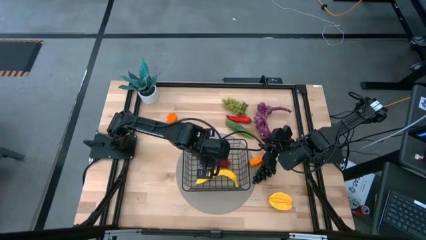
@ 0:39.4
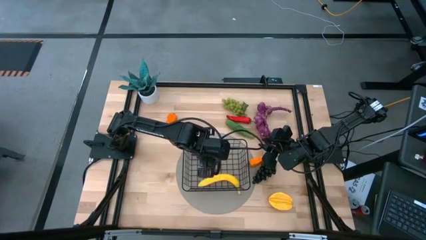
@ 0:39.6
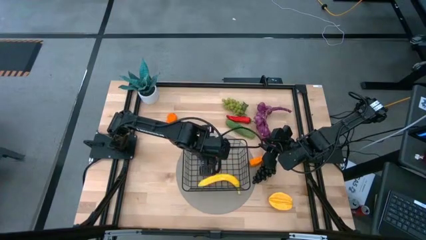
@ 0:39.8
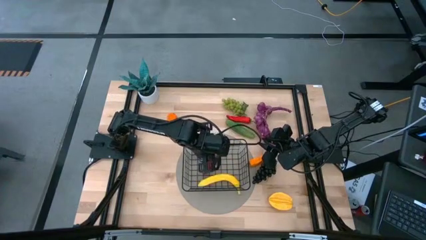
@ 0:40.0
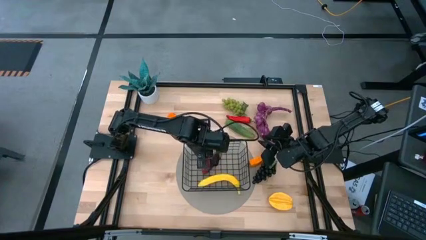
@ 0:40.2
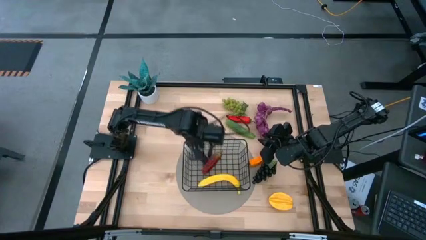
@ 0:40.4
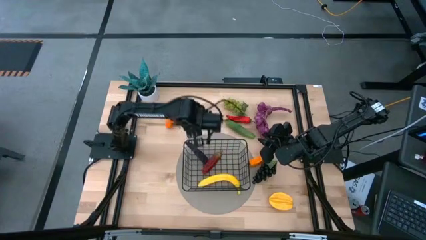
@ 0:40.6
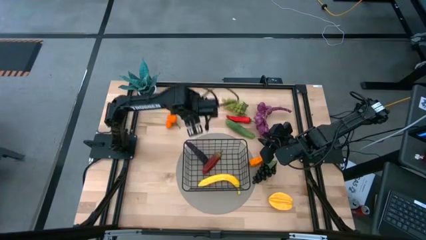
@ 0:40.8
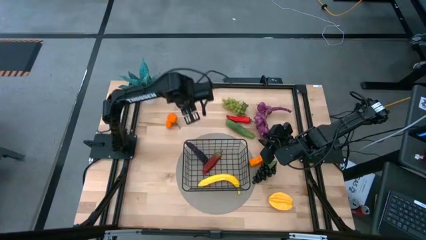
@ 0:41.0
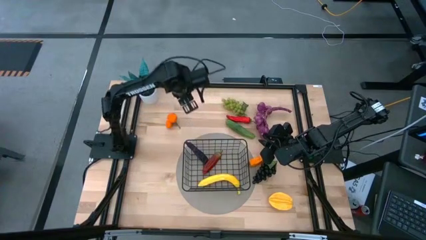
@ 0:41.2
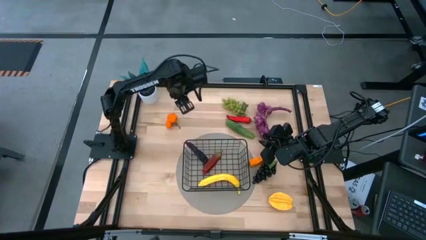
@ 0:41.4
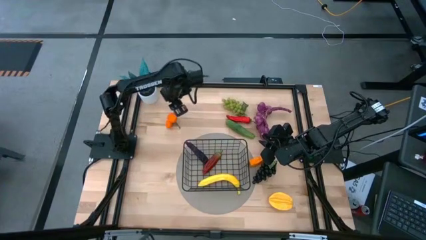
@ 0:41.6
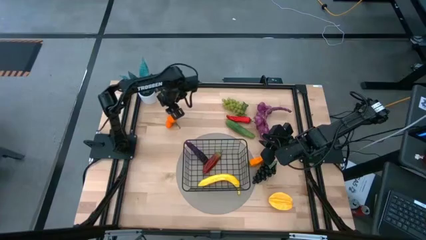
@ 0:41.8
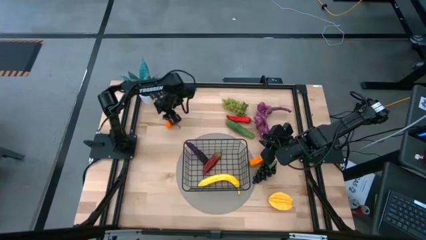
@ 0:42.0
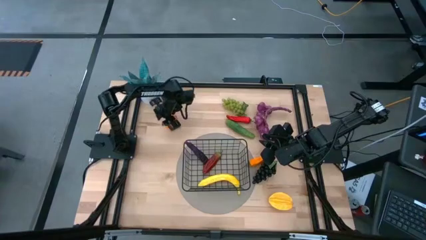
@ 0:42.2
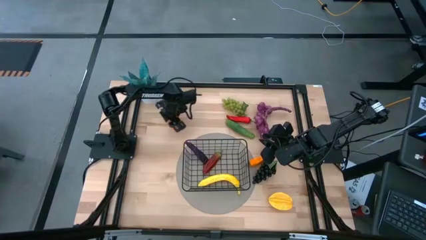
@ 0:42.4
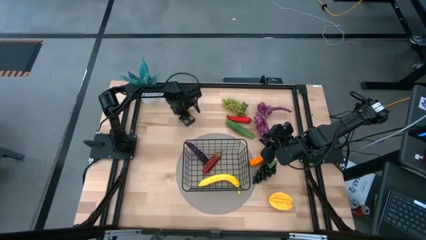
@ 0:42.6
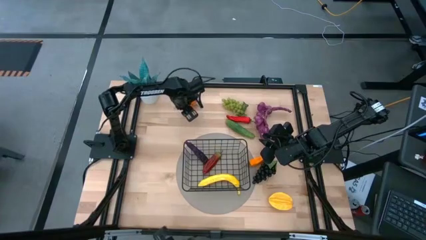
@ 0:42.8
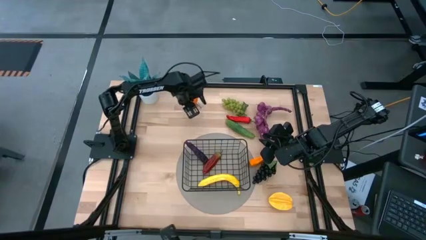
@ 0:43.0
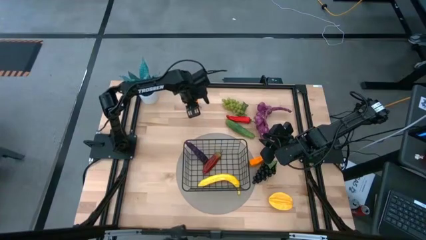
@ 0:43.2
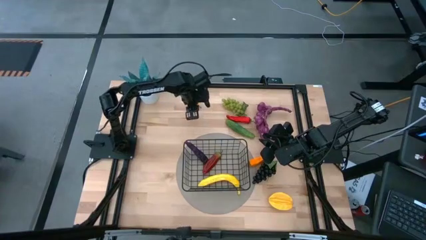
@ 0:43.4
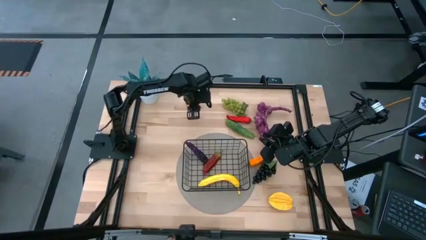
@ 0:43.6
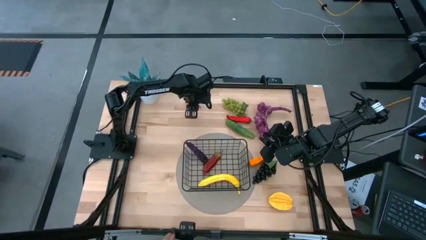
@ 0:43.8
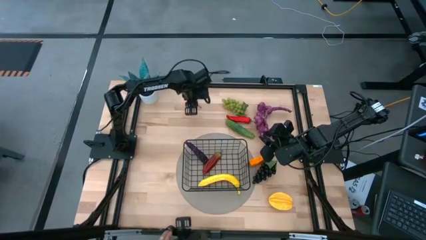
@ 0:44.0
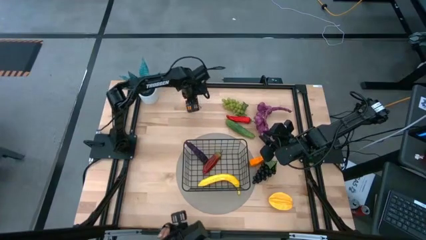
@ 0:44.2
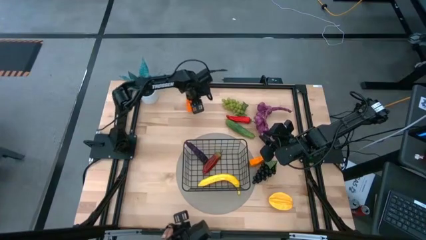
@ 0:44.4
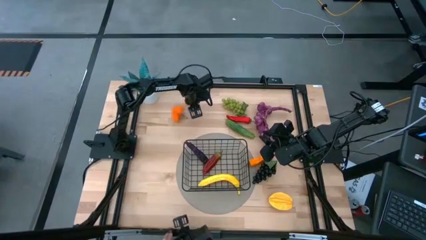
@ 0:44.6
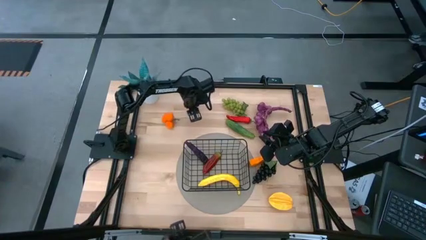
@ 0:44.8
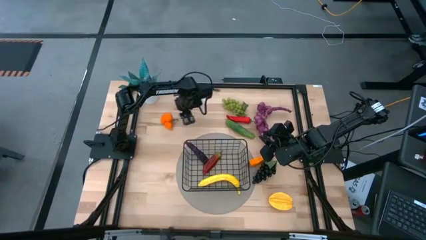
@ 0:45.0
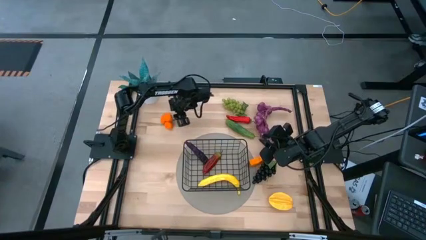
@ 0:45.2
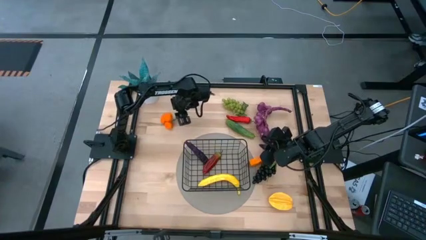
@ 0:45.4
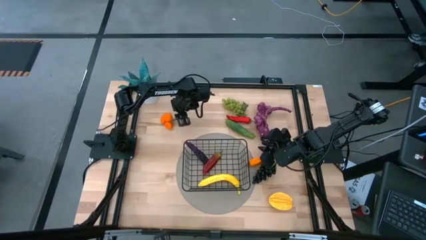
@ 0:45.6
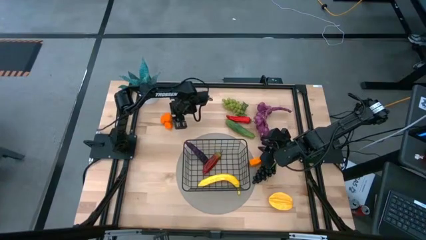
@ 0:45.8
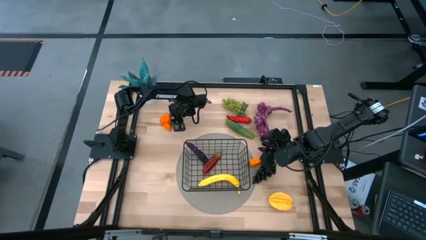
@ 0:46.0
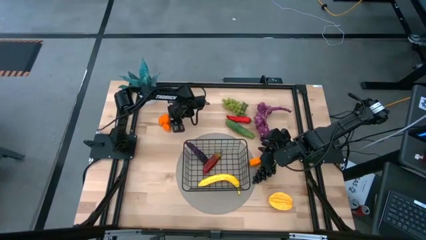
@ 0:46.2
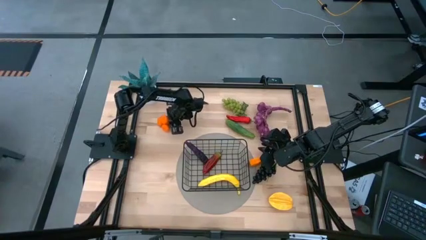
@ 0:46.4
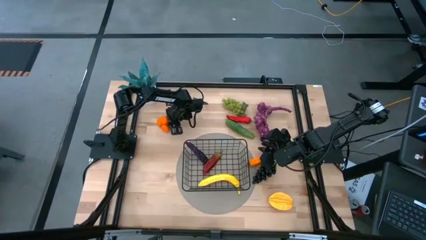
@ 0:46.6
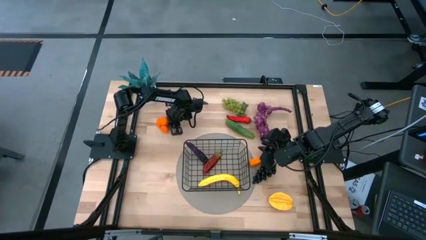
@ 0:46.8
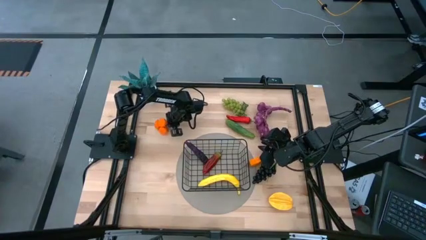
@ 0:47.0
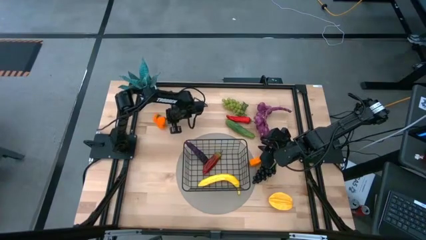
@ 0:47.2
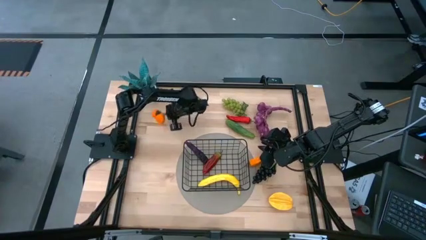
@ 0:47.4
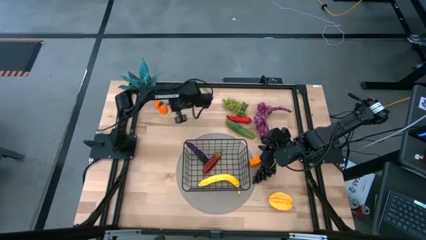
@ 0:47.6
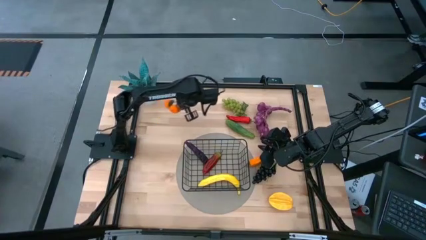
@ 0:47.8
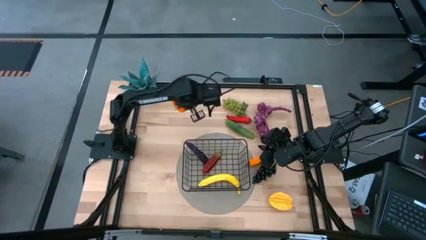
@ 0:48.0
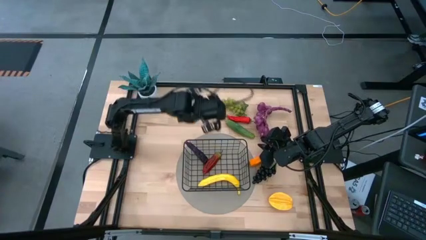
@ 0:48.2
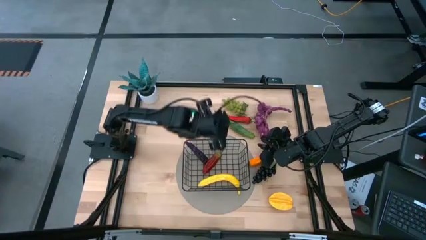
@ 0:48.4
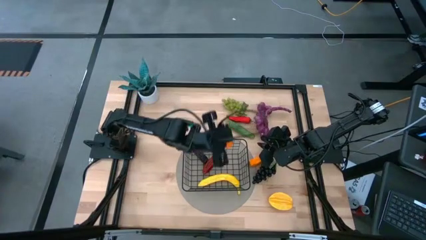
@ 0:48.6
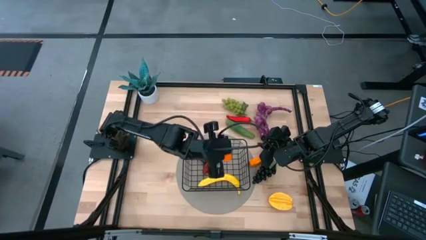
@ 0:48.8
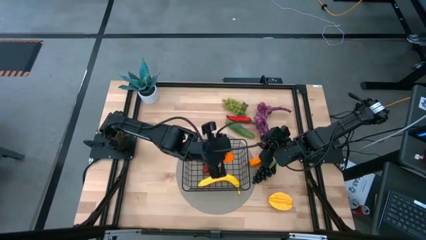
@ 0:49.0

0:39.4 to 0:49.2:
Task: Build produce basket
Put the tangerines into the black wire basket
